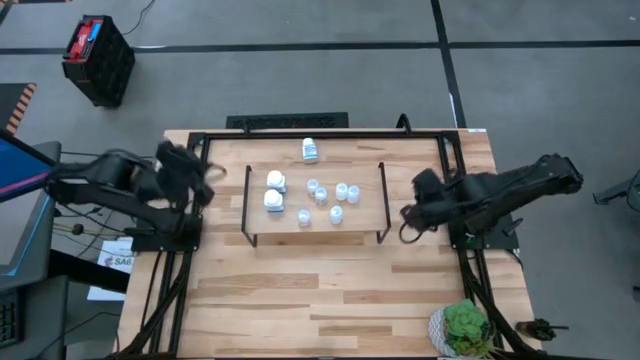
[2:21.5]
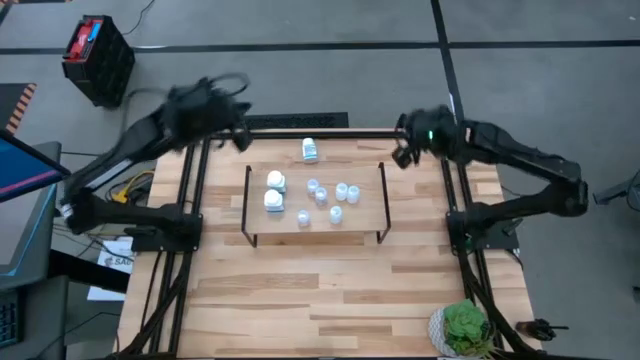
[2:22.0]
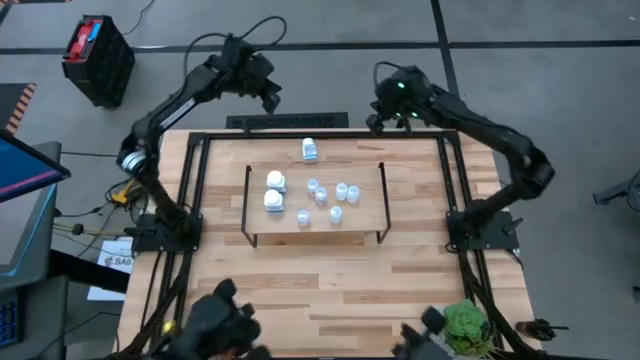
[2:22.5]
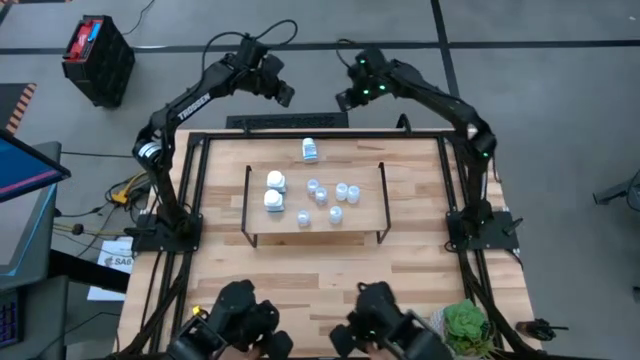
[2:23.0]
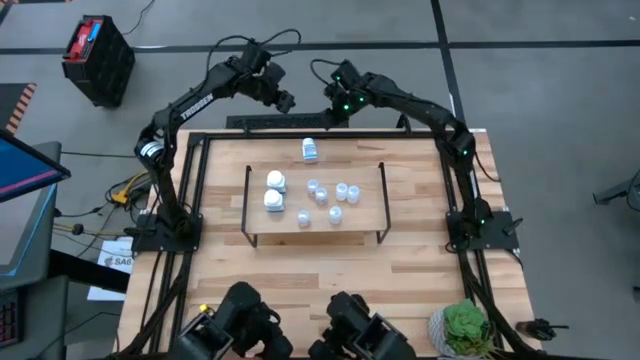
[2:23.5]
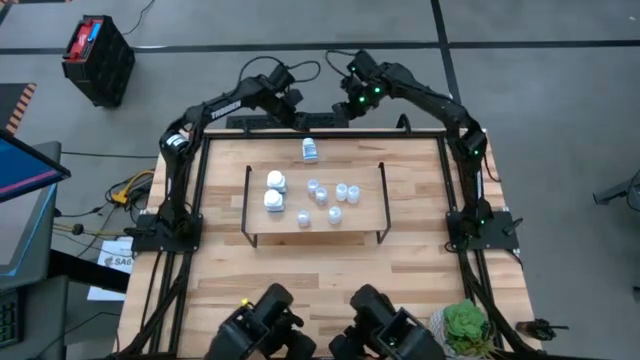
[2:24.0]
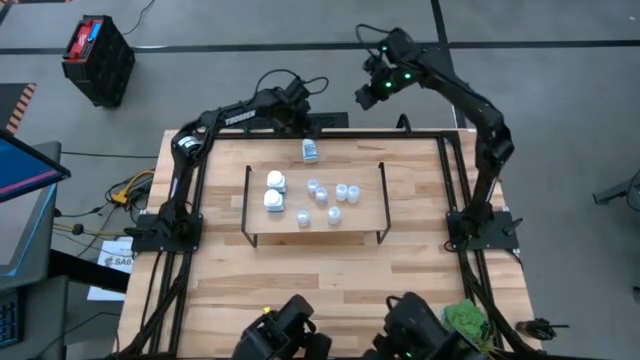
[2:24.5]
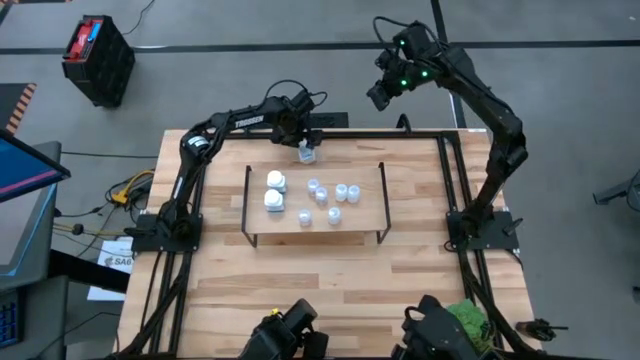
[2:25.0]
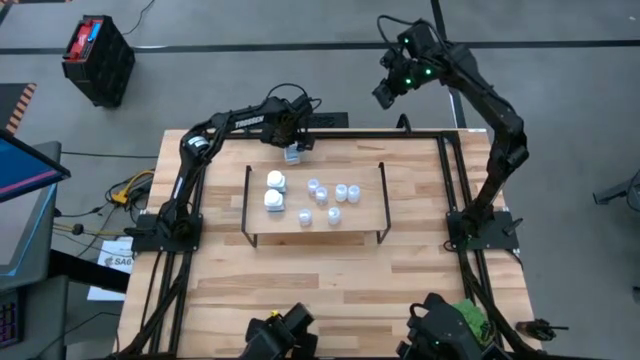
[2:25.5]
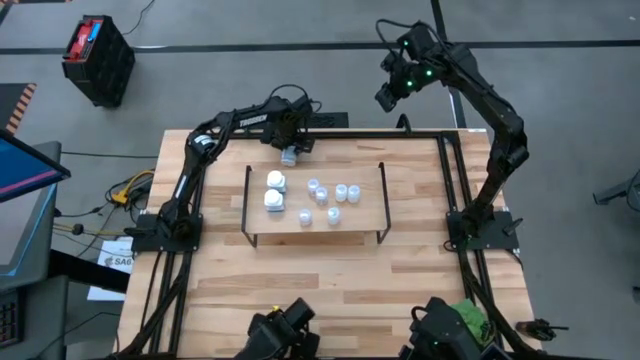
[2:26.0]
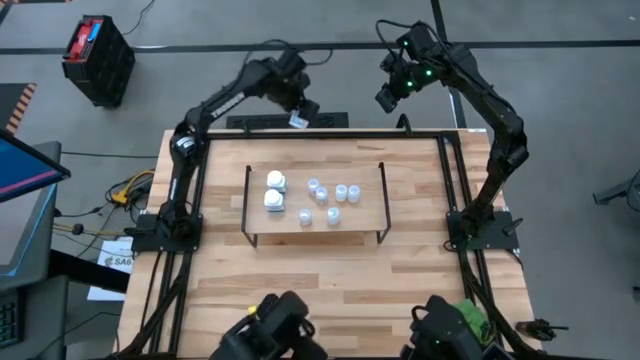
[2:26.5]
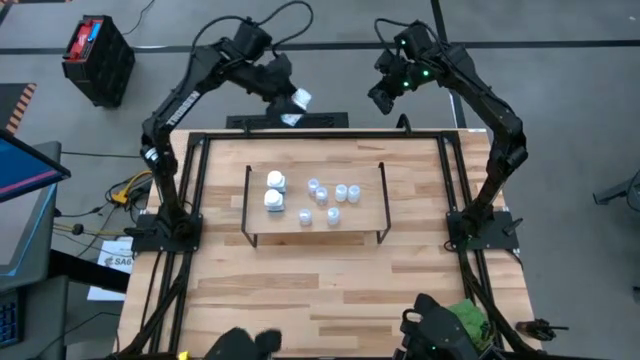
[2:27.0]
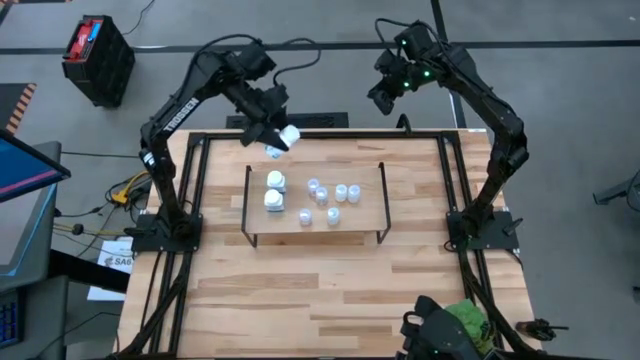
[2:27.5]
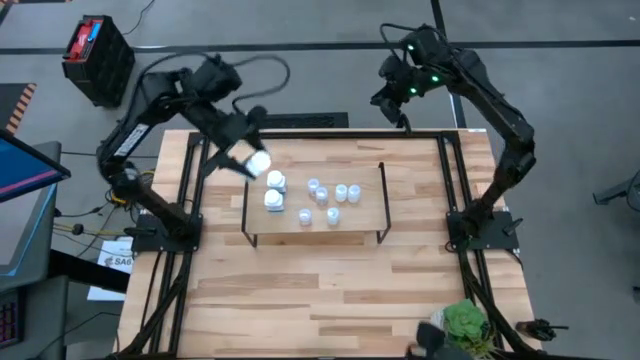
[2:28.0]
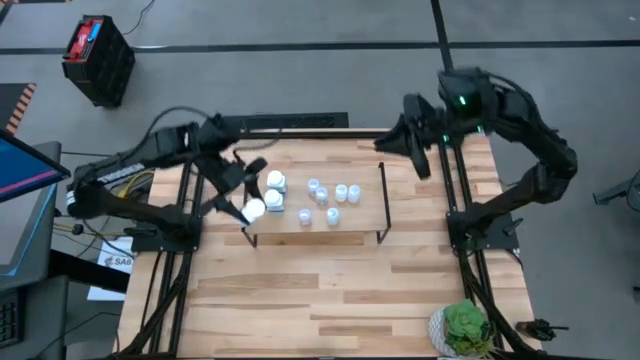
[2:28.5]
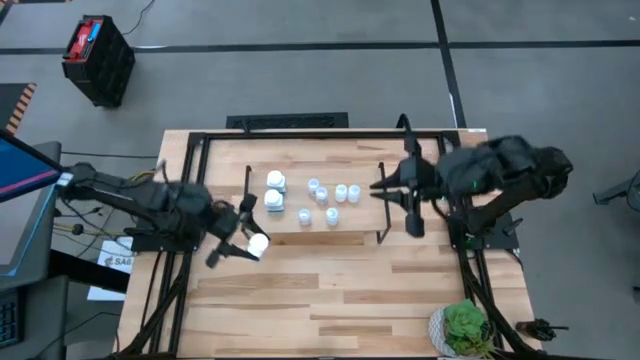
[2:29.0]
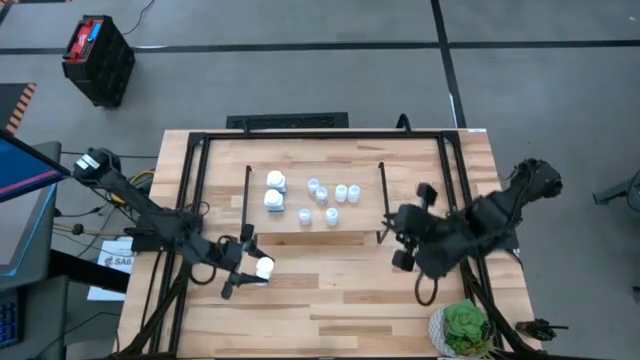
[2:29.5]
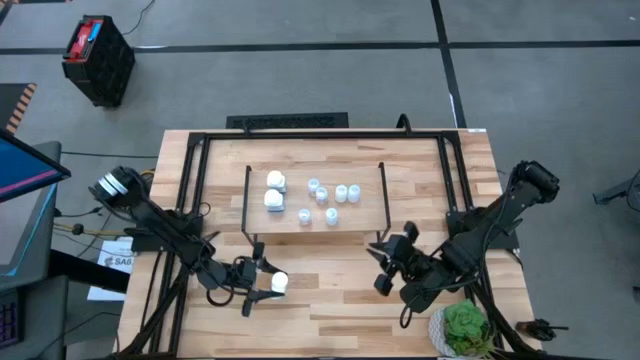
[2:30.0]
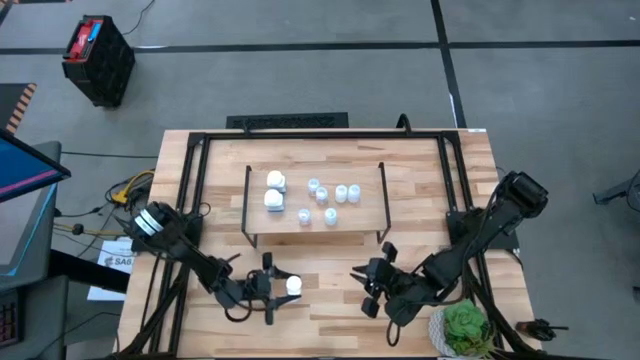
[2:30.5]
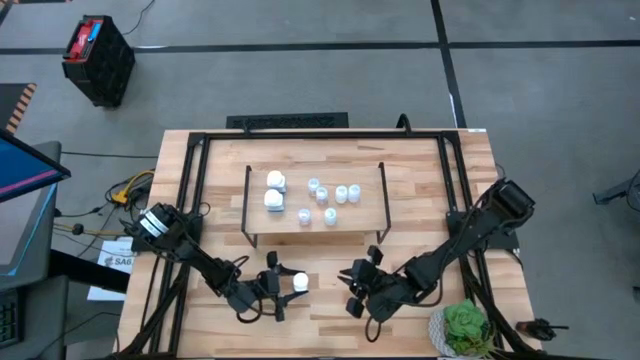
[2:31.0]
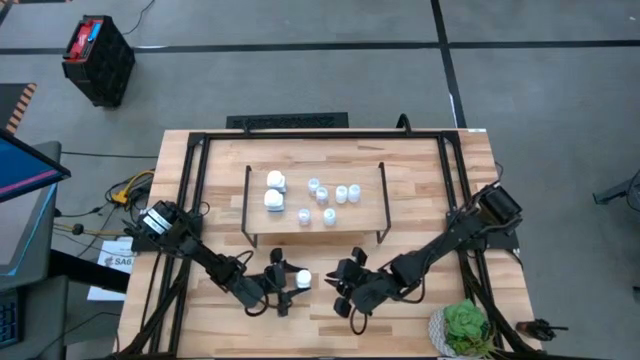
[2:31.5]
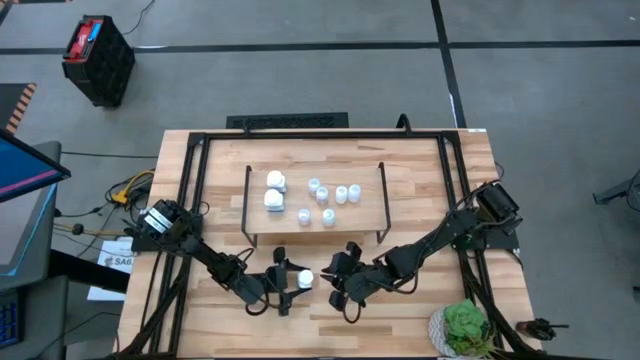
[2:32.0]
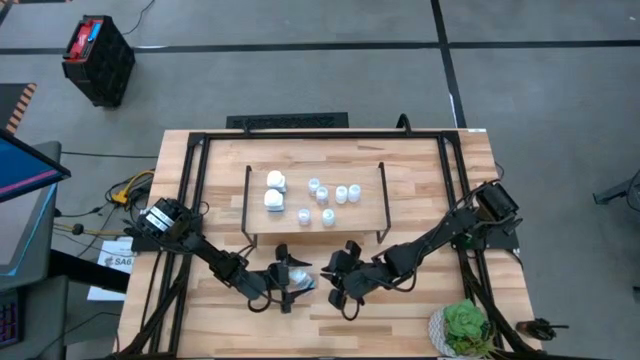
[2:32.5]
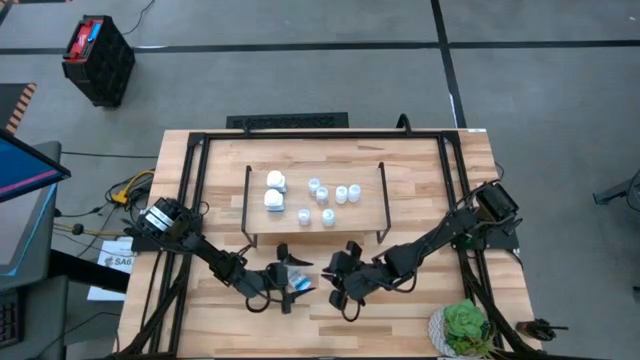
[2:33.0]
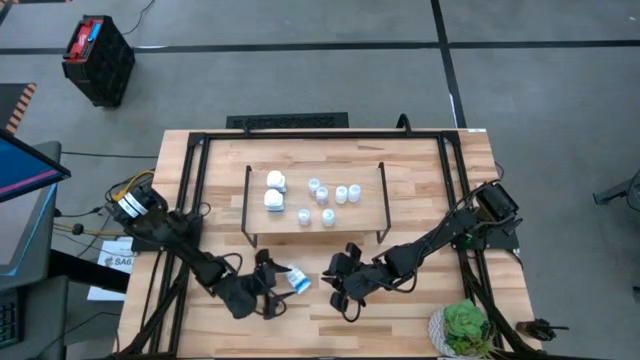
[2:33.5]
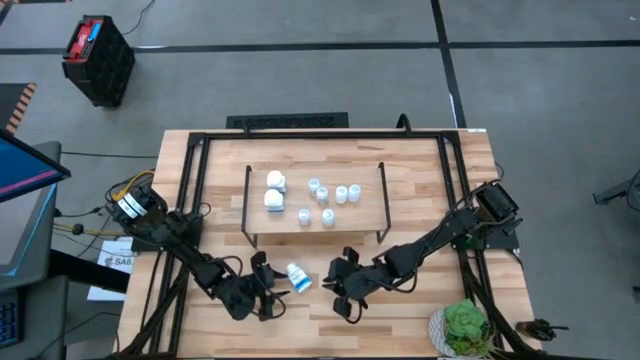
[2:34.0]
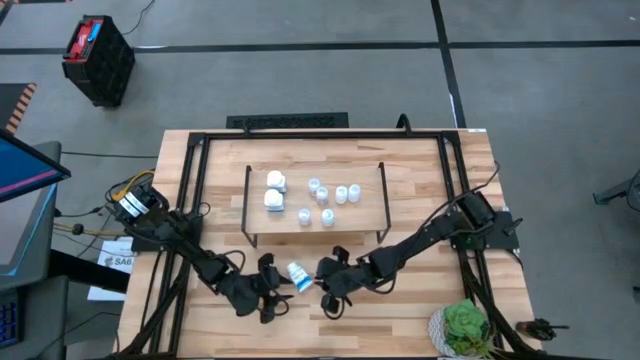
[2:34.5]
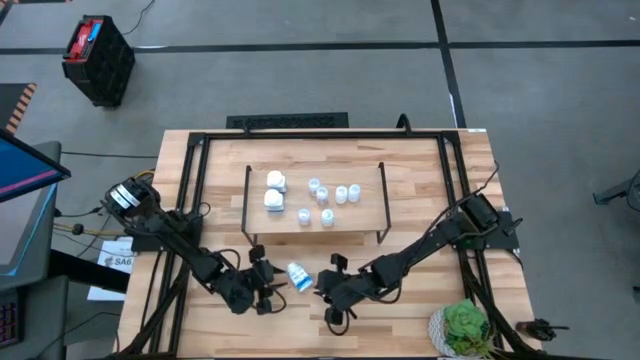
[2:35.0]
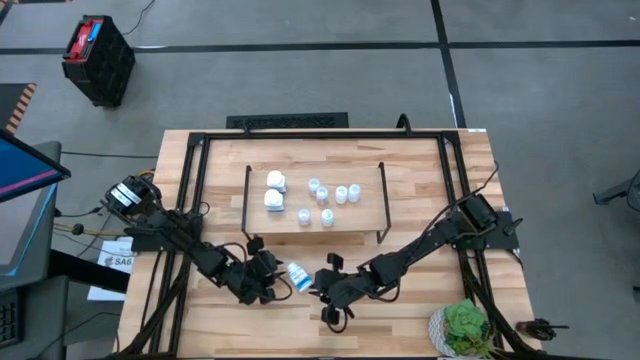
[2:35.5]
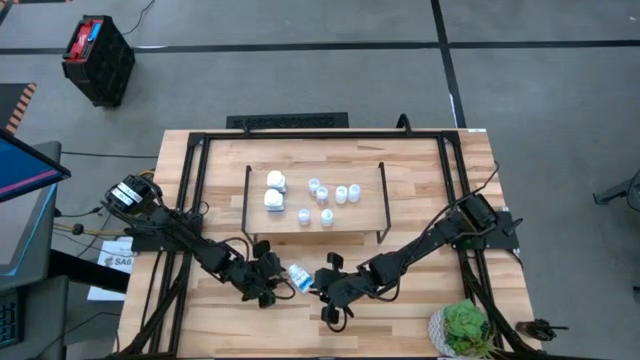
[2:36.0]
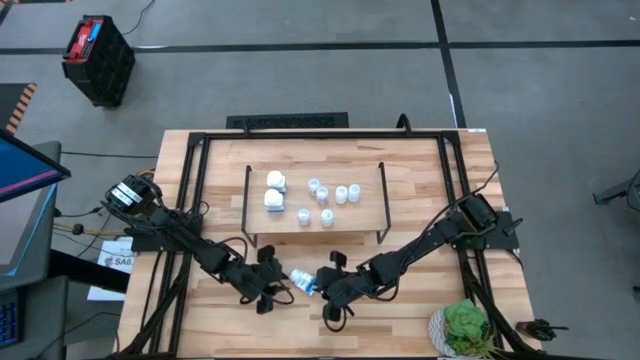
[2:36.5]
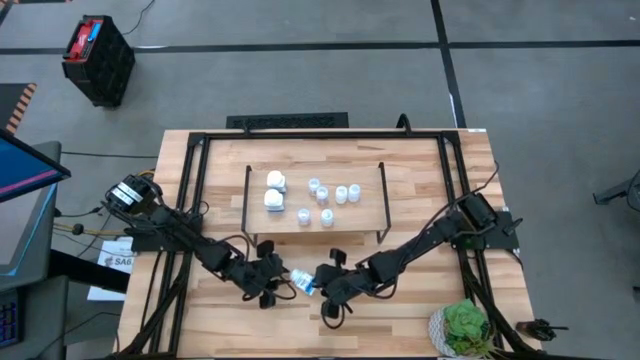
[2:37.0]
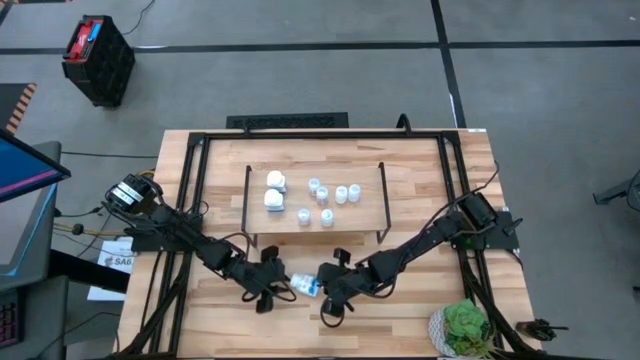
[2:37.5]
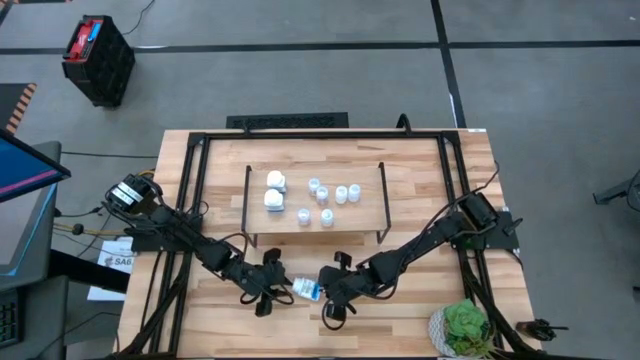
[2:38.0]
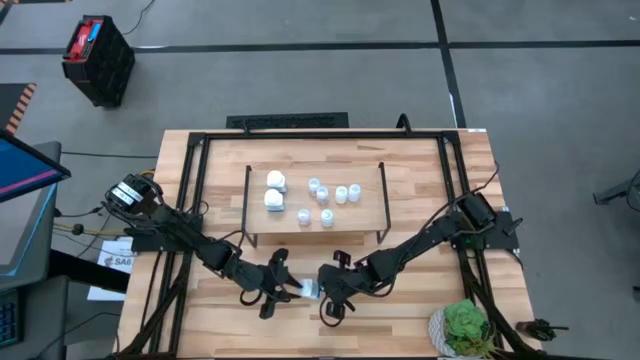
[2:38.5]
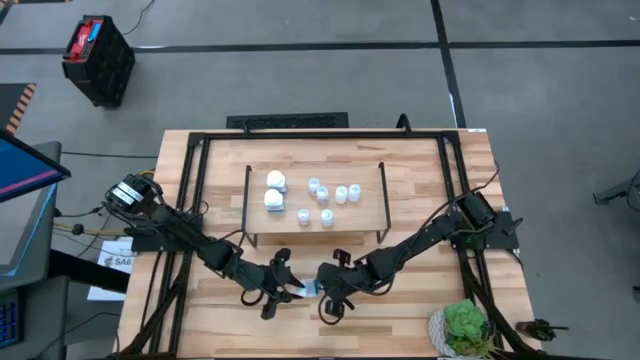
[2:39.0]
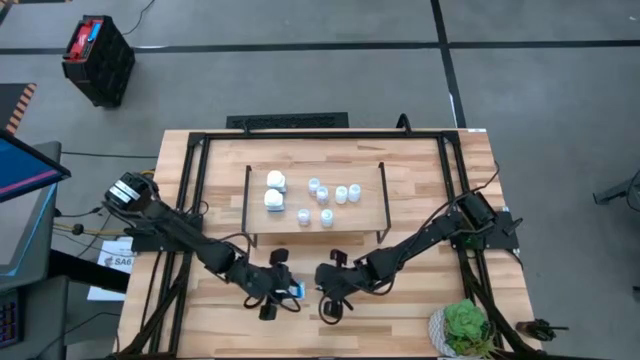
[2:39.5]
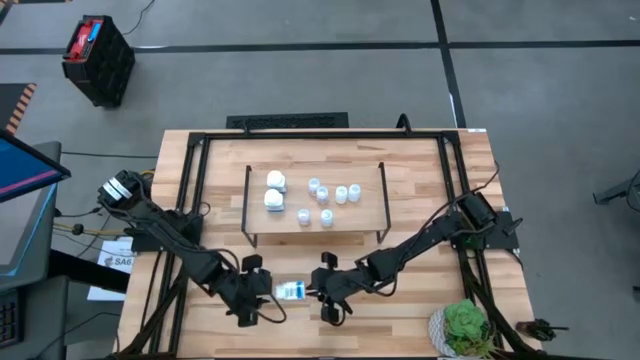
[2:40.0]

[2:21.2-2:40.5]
Task: Pick and place medicine bottles onto shelf by color
Put the white blue pill bottle on the shelf

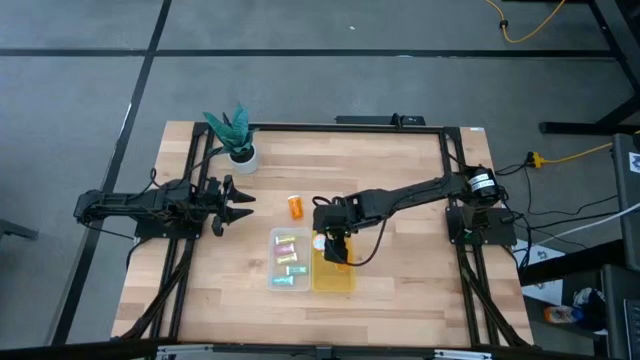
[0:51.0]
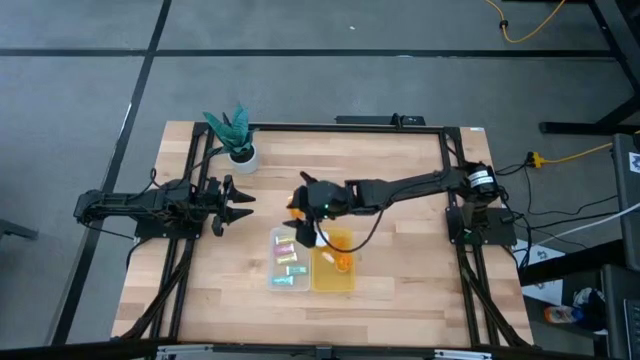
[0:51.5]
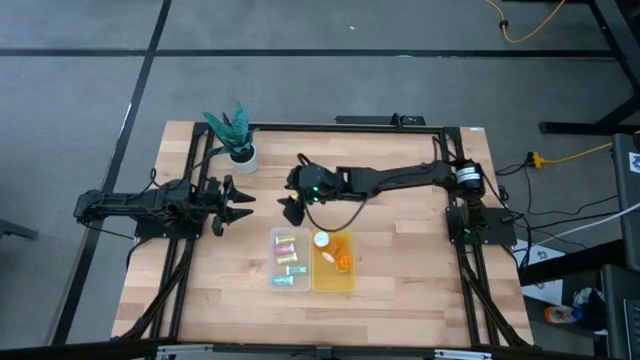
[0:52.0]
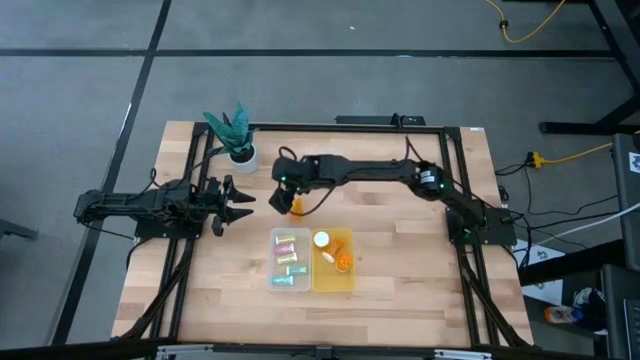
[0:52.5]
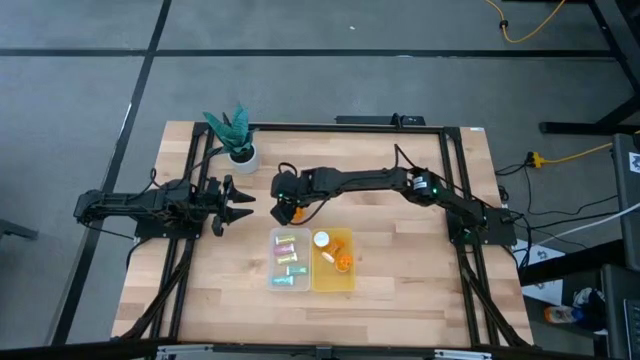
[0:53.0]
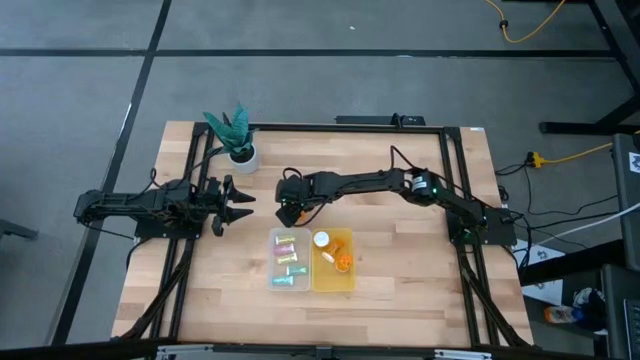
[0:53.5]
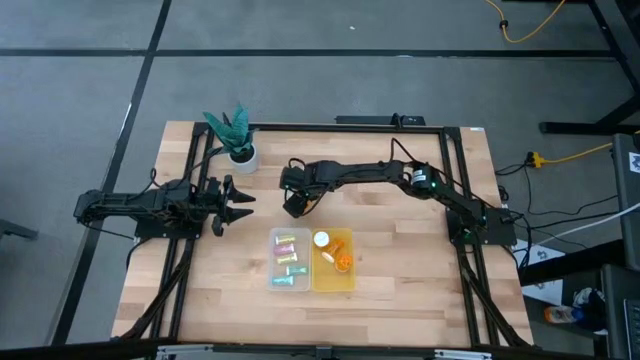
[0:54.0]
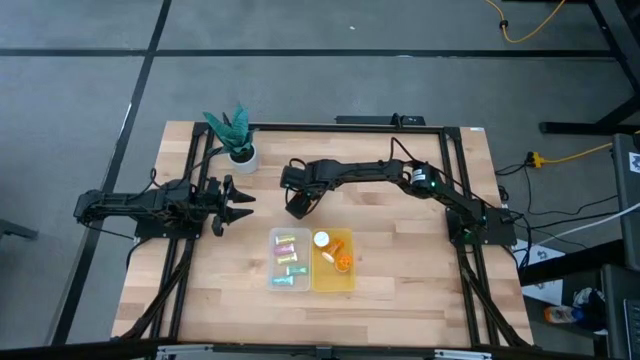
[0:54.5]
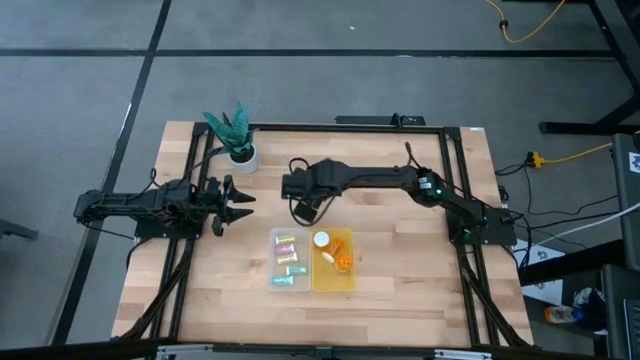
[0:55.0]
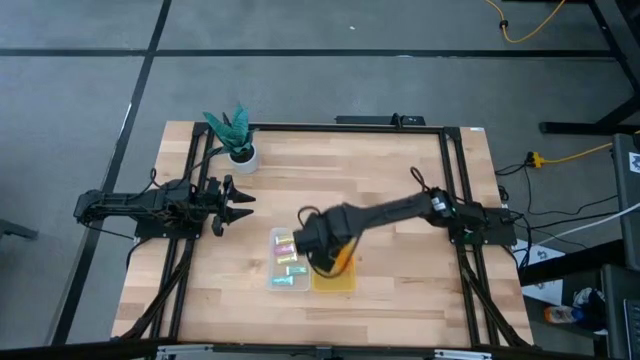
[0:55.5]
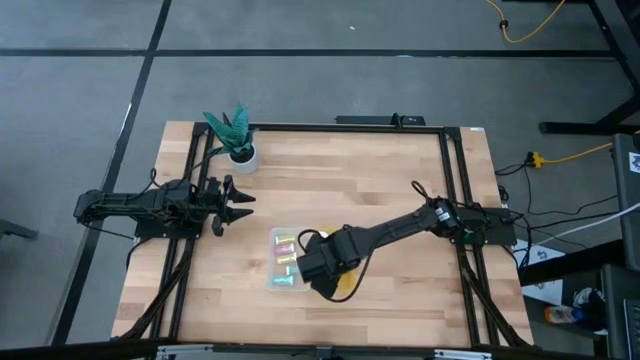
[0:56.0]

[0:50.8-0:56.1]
Task: Pick and place medicine bottles into bin by pill shape (circle, oval)
Put the orange capsule bottle into the yellow bin
